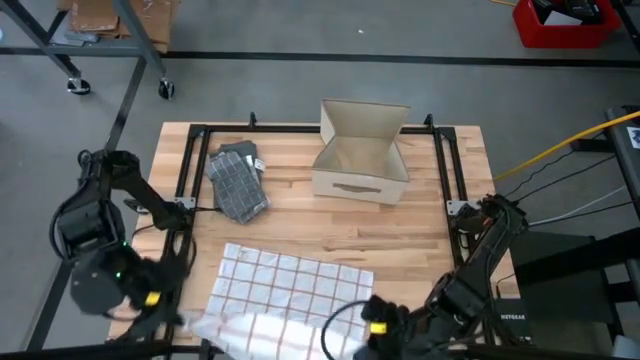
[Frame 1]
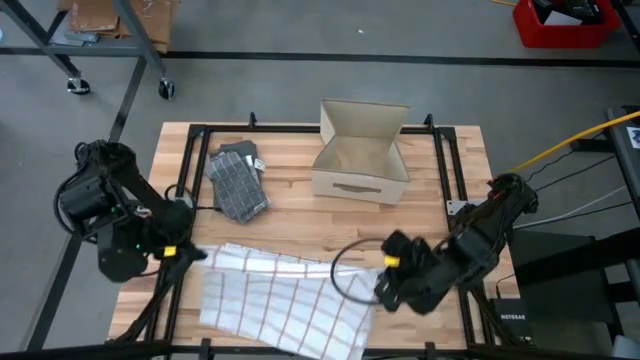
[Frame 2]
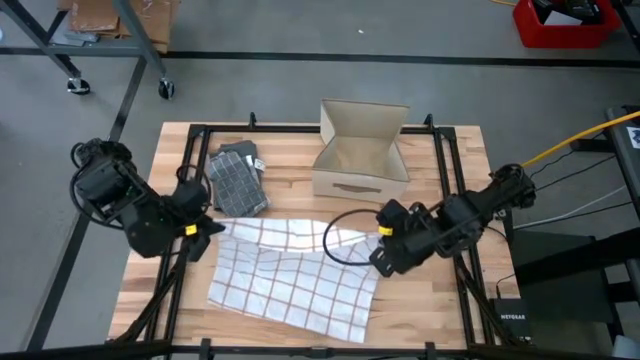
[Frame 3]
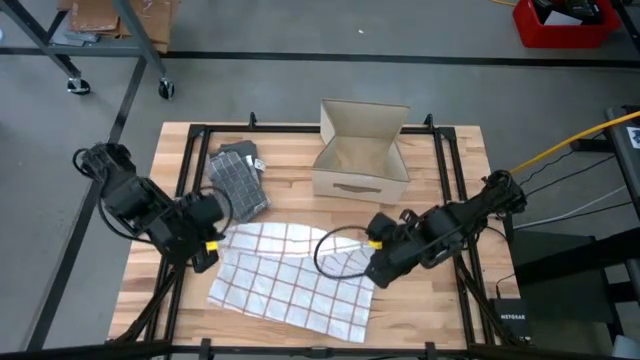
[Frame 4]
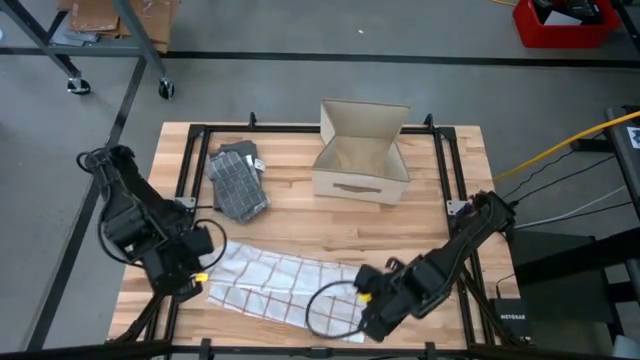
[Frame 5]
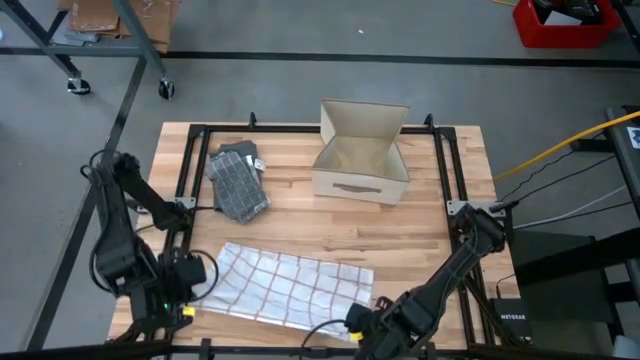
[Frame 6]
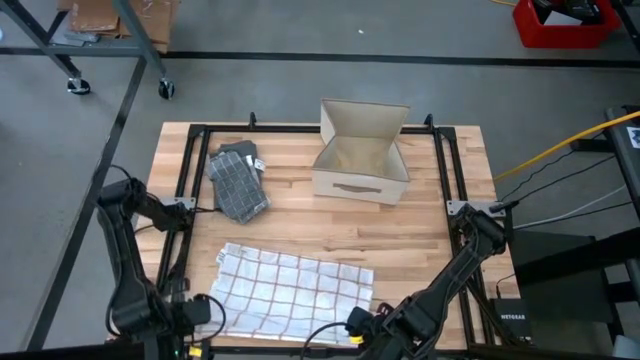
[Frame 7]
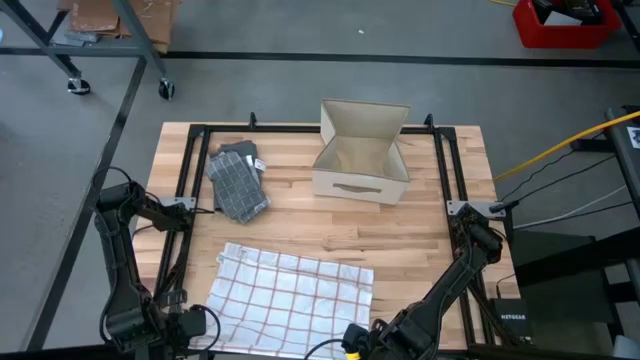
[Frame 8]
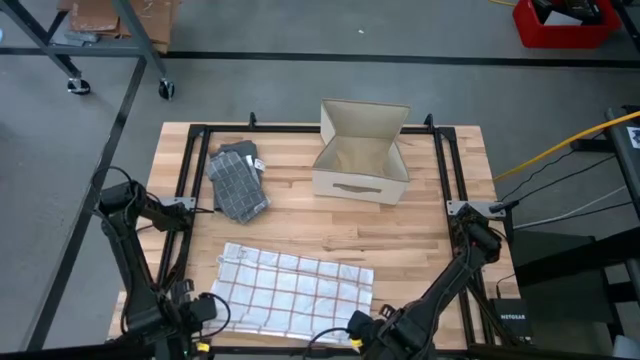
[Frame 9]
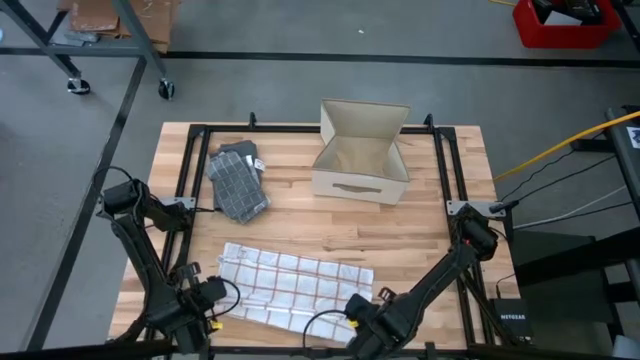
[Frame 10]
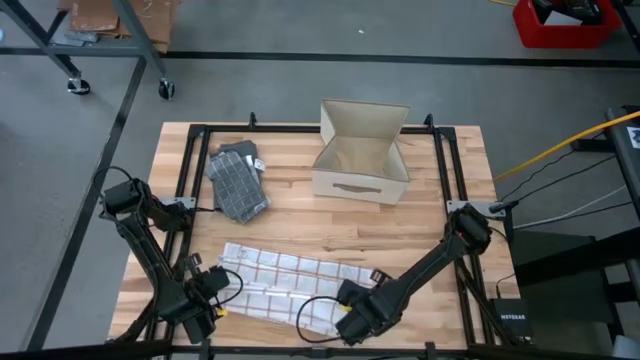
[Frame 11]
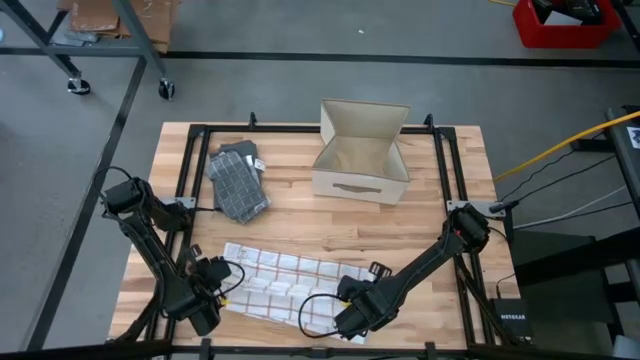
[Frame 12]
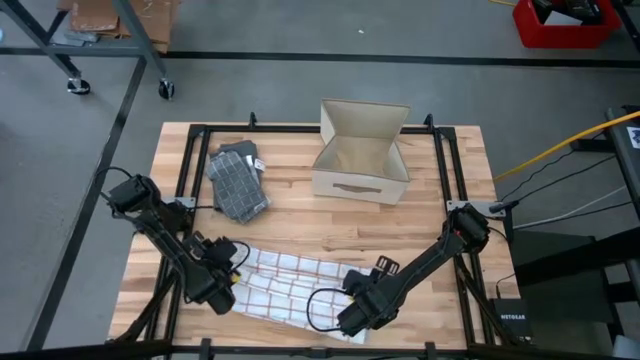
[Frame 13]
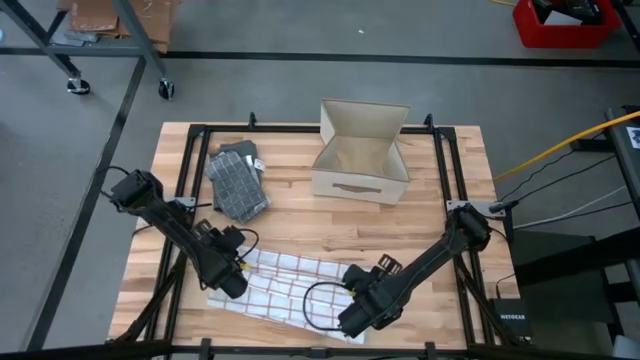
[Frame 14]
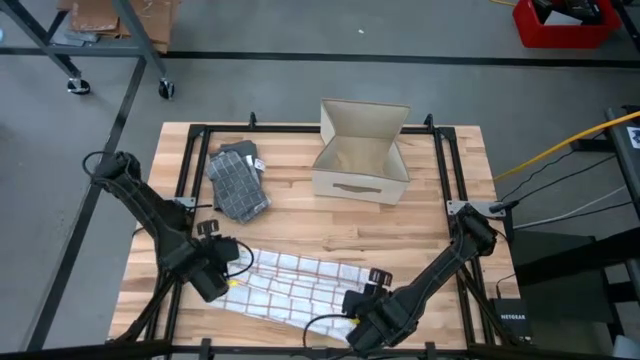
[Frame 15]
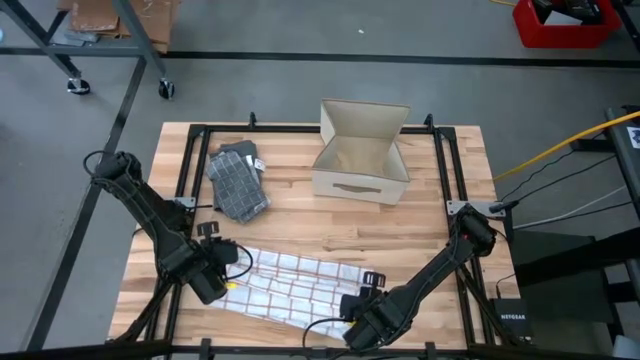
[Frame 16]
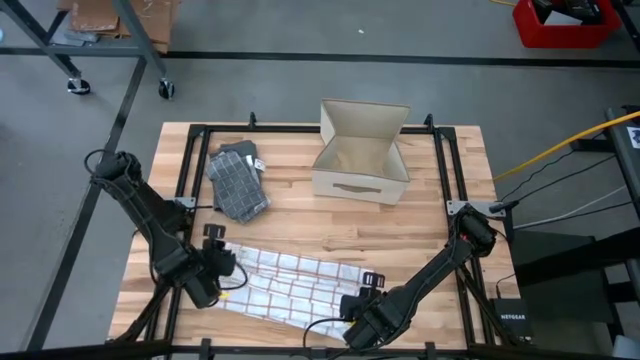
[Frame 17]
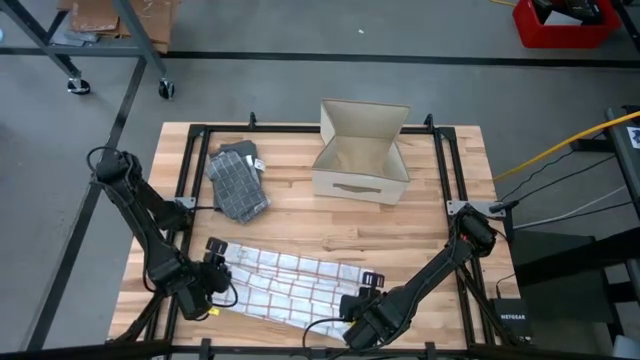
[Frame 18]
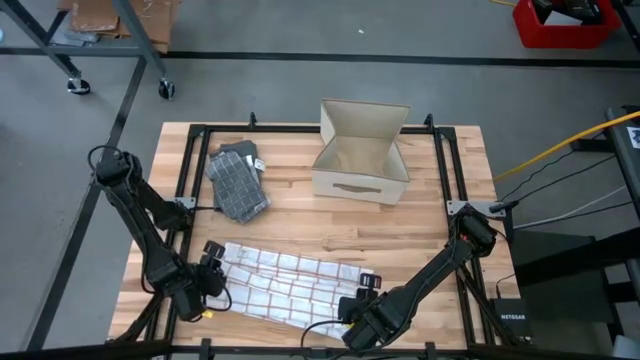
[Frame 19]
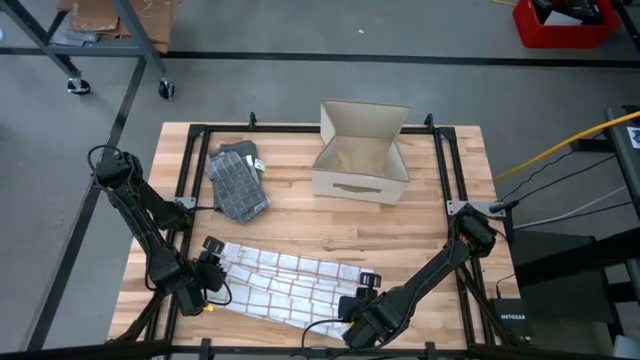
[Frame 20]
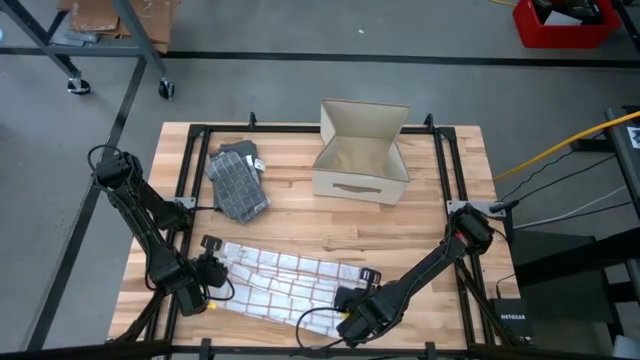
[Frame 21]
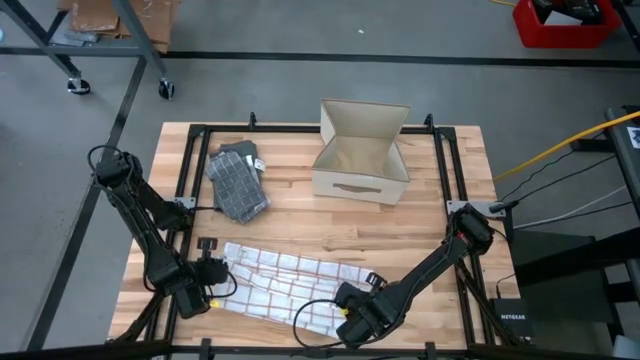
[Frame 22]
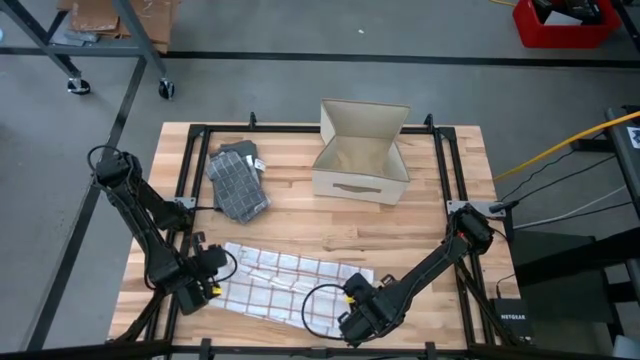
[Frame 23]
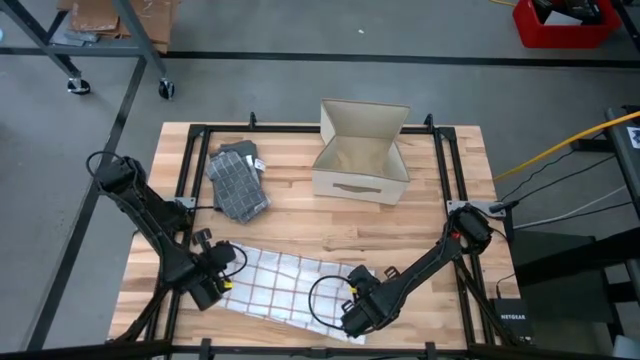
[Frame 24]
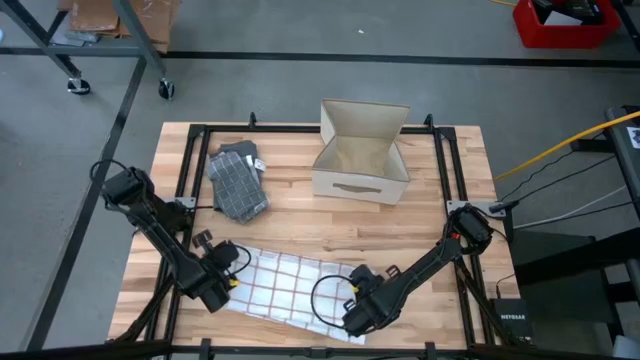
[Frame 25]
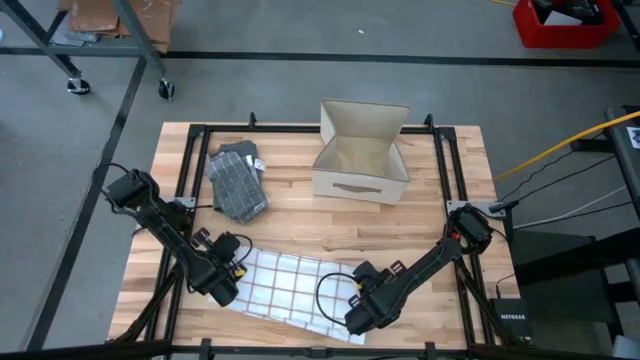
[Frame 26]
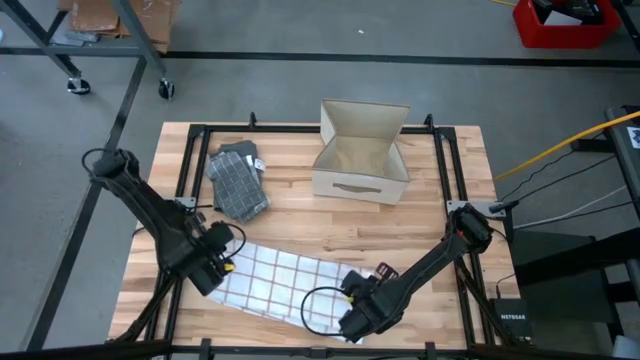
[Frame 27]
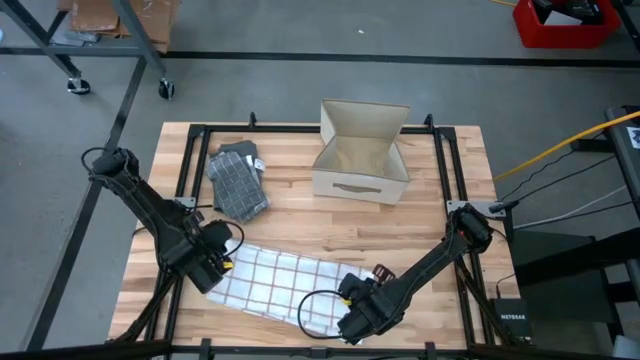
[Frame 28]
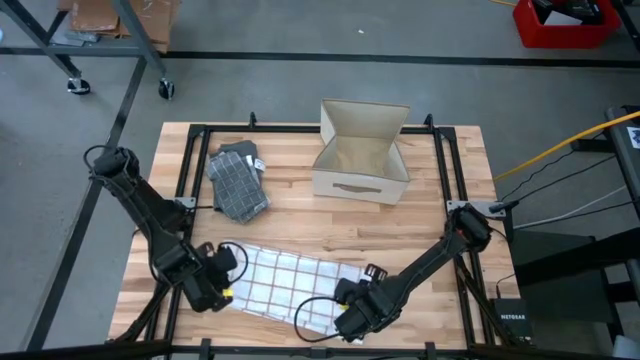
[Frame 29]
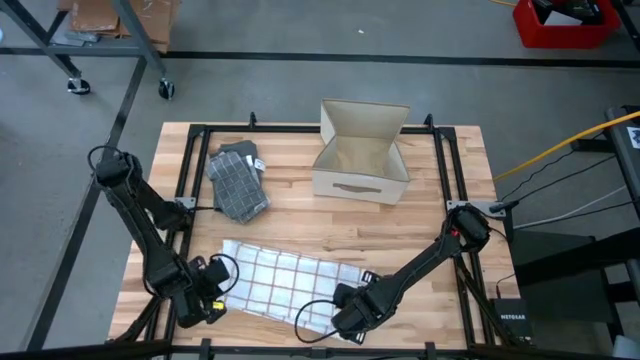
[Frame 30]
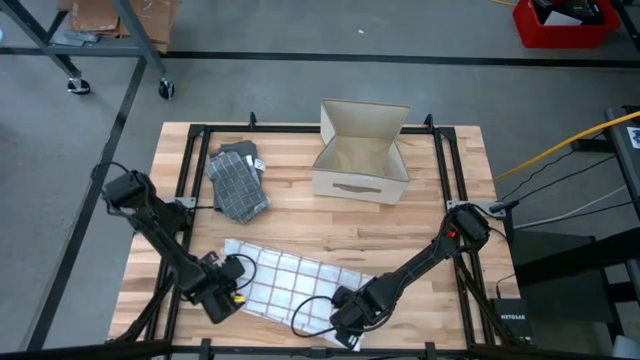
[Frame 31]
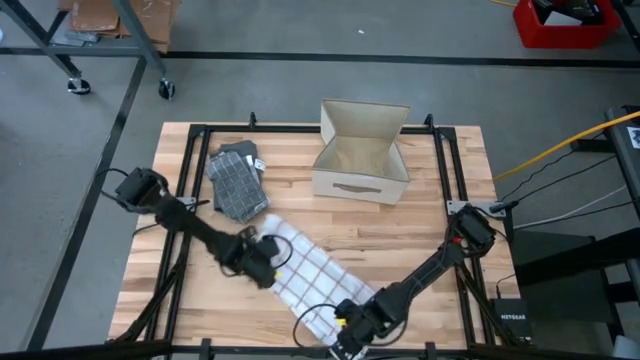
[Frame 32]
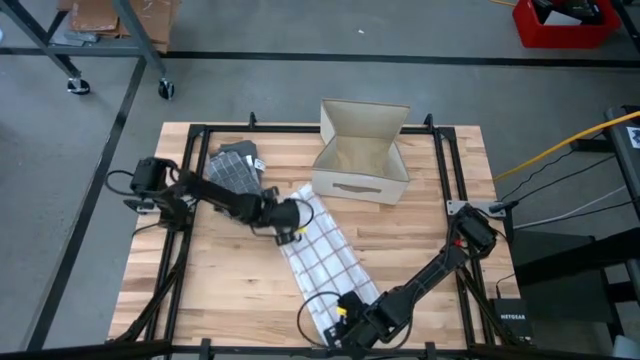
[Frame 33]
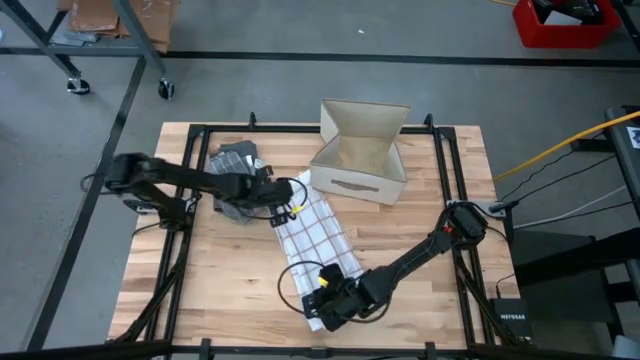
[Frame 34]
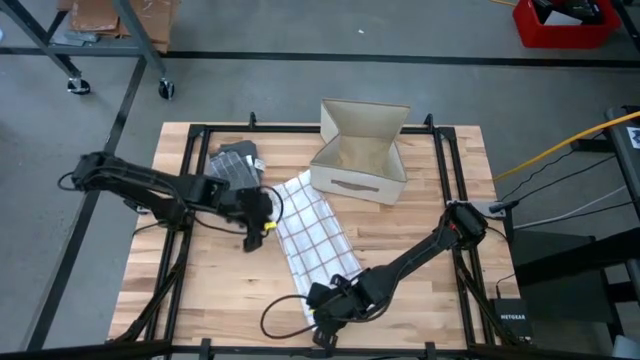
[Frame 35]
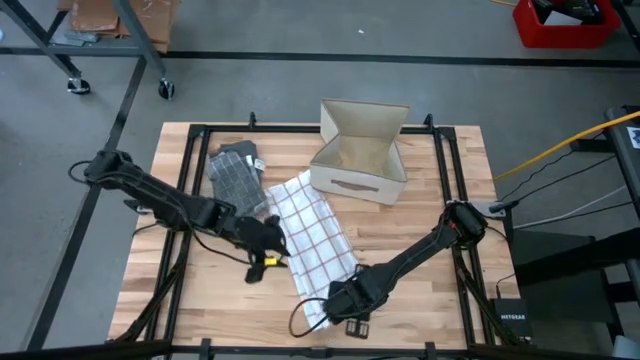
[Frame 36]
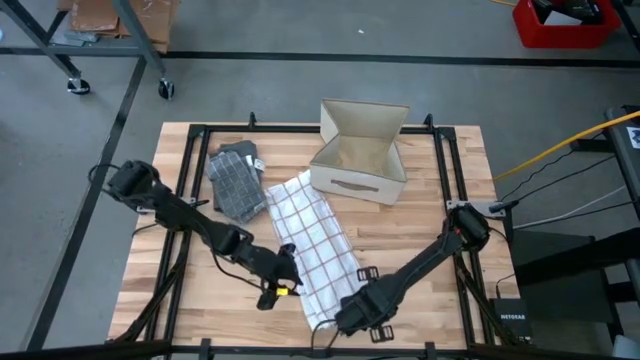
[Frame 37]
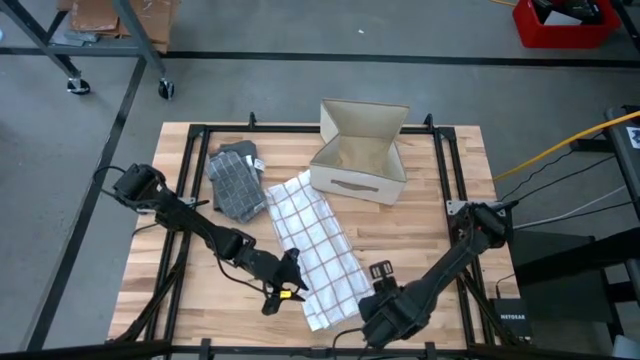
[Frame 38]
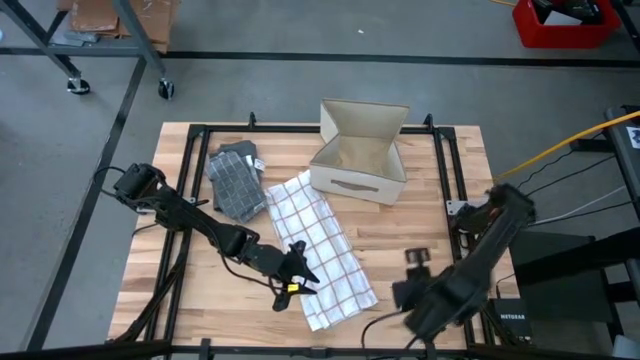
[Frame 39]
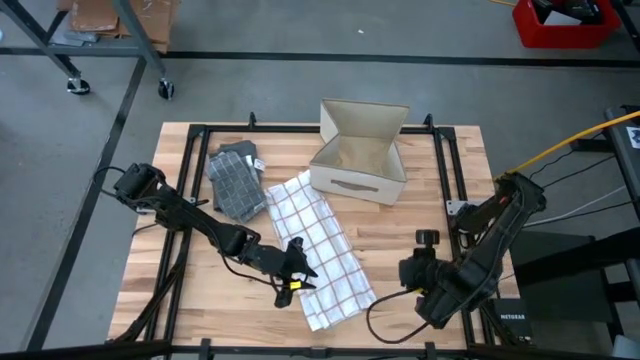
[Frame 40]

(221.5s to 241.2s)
Task: Fold towel
Fold the white towel
